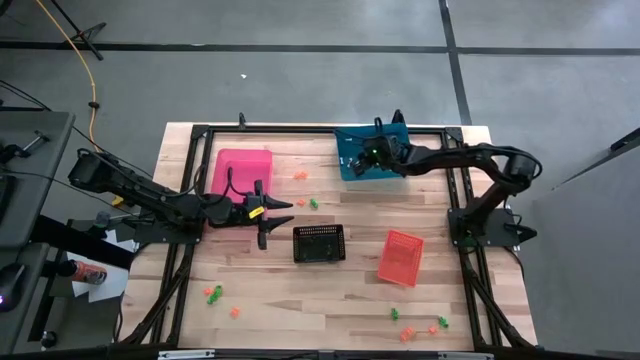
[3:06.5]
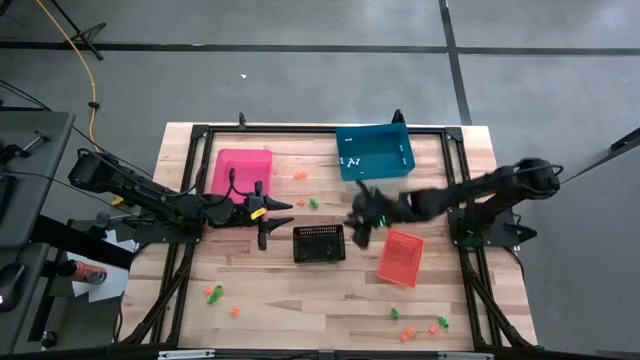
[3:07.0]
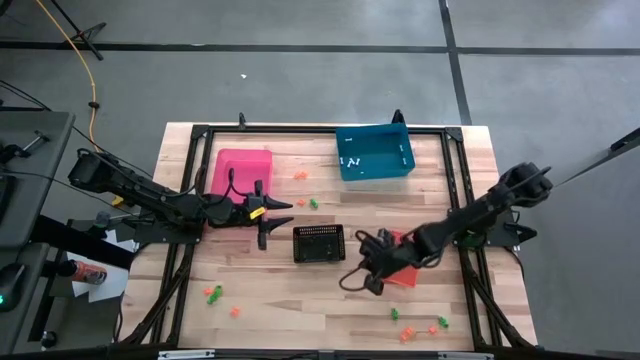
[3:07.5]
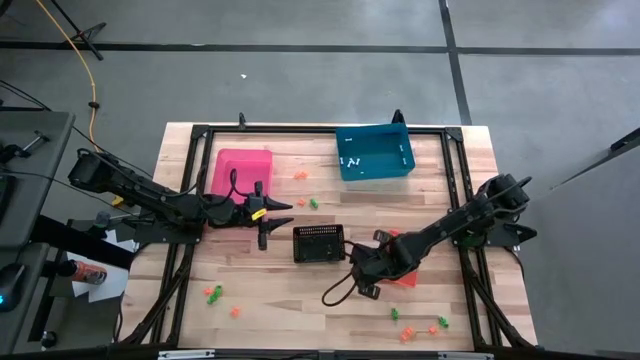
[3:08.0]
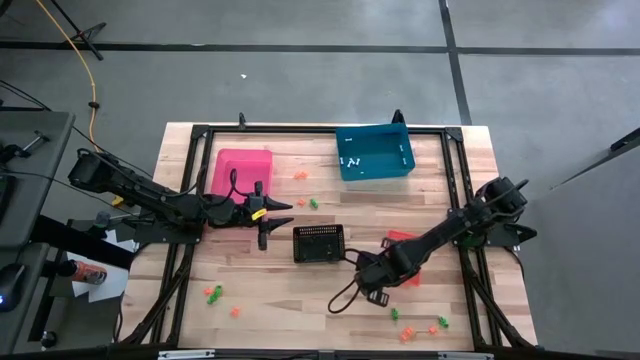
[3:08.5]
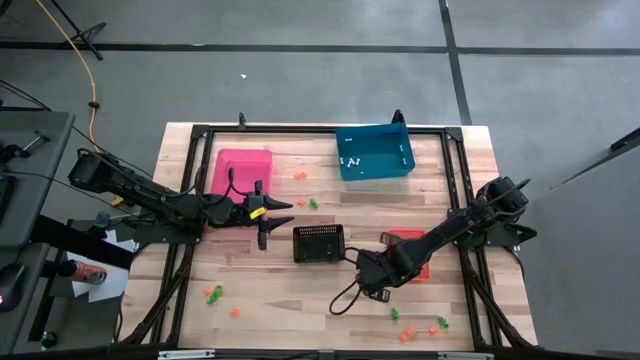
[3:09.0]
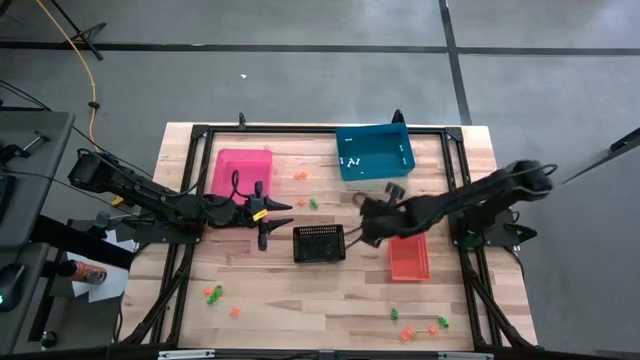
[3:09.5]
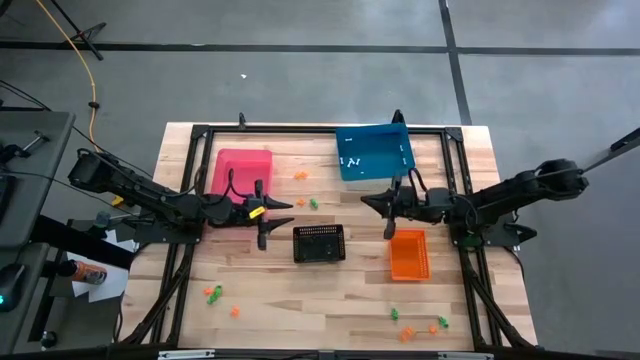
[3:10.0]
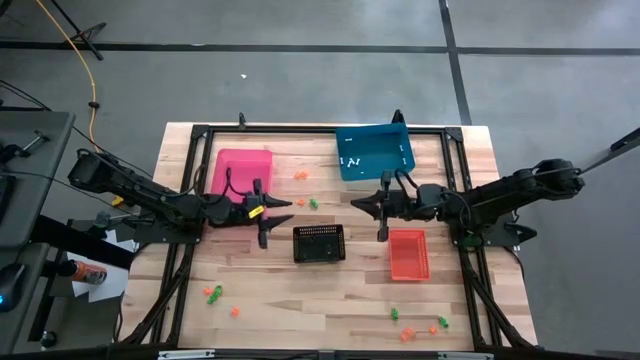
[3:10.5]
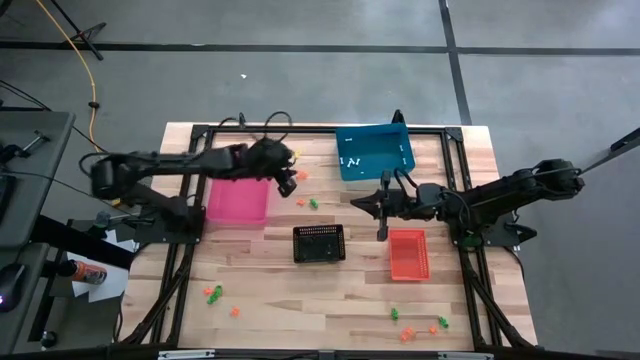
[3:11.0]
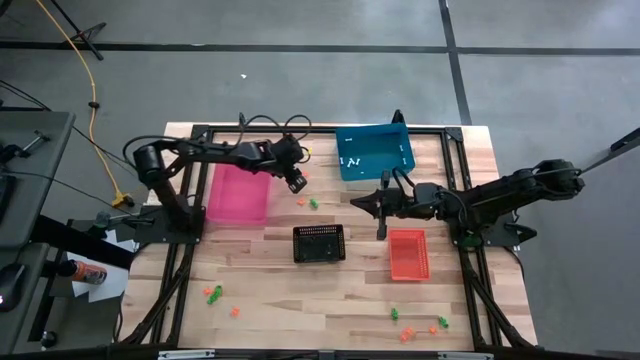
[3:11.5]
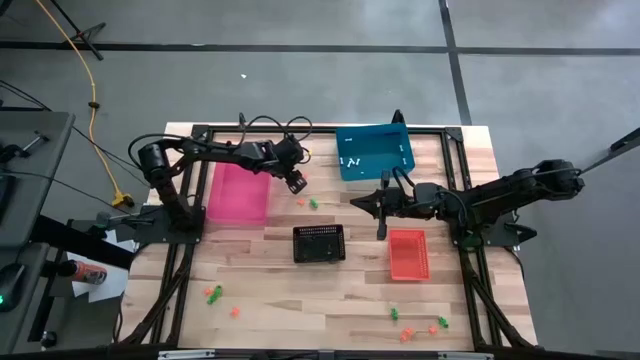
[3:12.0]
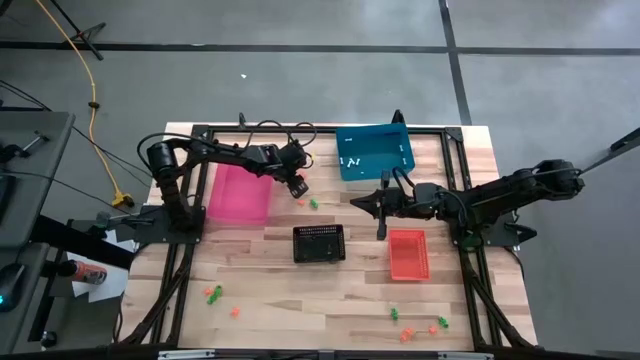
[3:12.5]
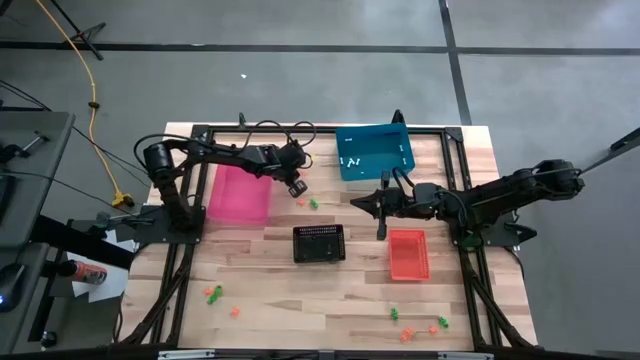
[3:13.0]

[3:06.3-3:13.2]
Task: Sort Halloween decoration
Put the orange spider toy into the pink bin

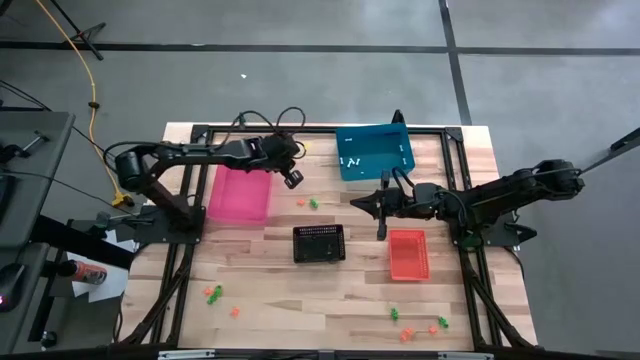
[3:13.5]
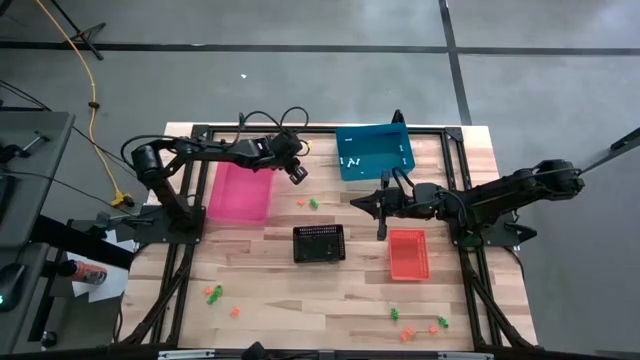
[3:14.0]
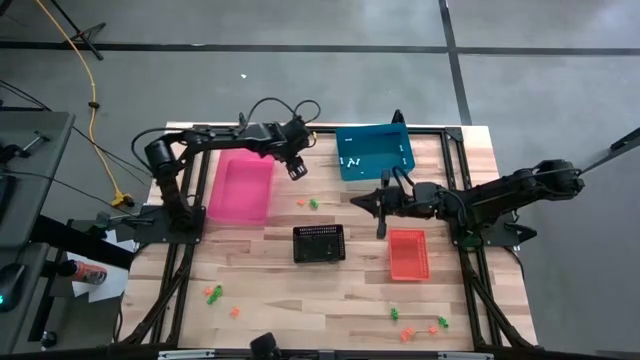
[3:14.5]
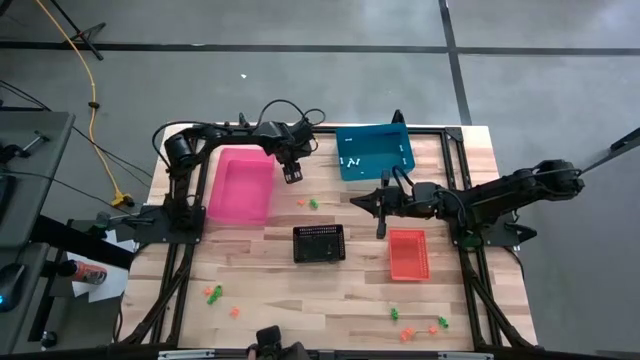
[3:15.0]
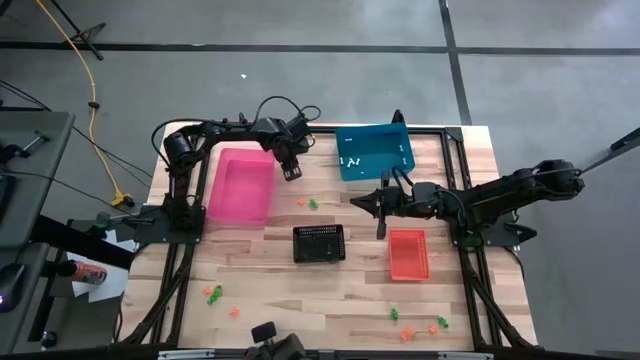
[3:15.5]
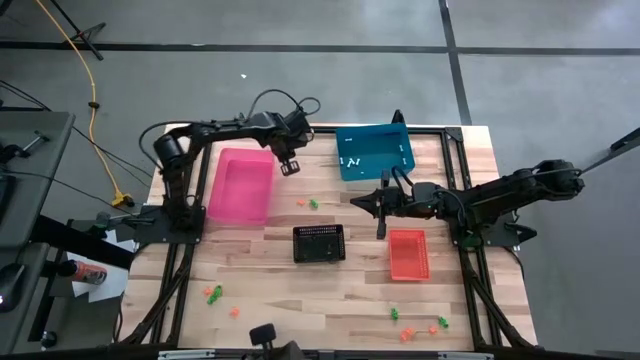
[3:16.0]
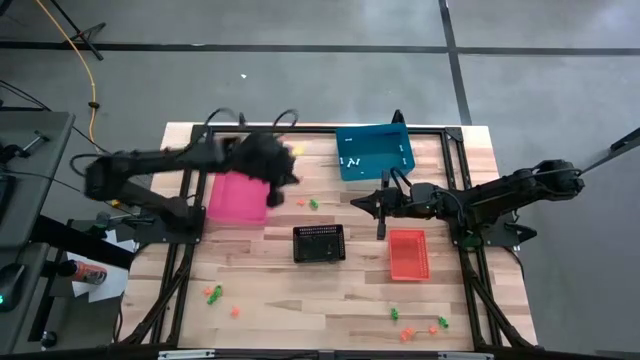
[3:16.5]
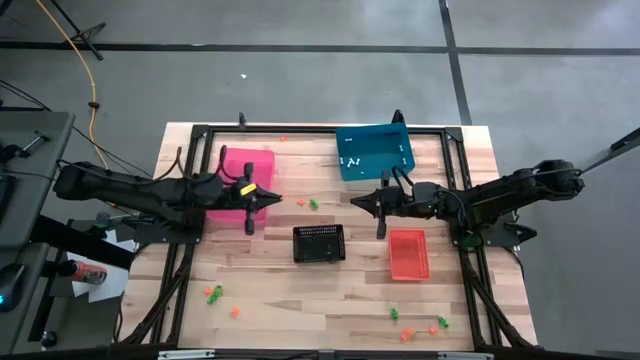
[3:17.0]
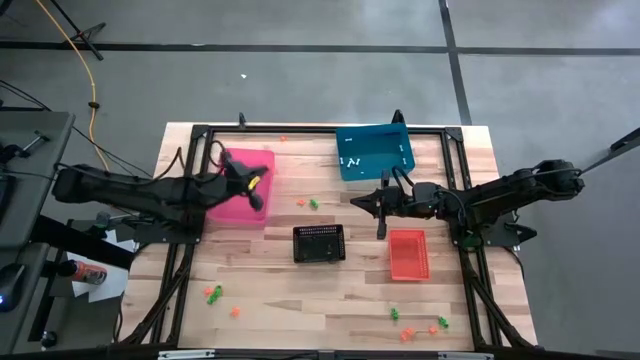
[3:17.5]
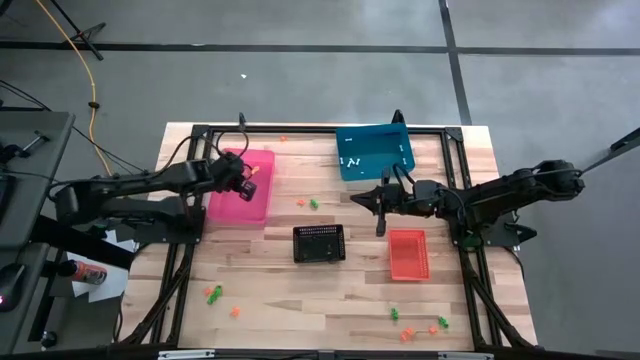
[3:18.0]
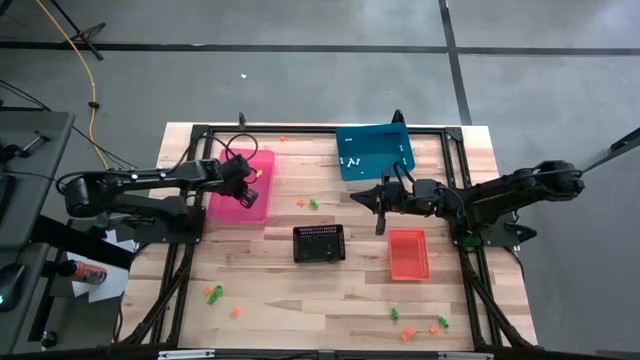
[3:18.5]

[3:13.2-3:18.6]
Put the orange spider toy into the pink bin

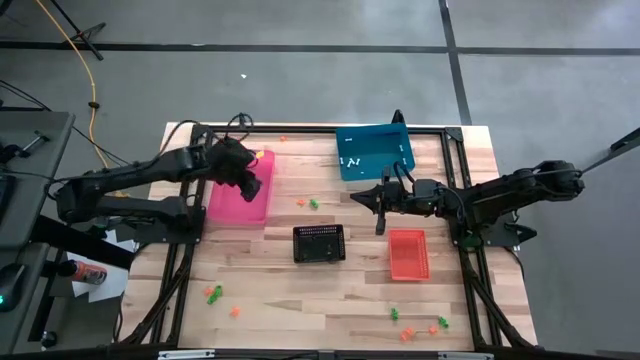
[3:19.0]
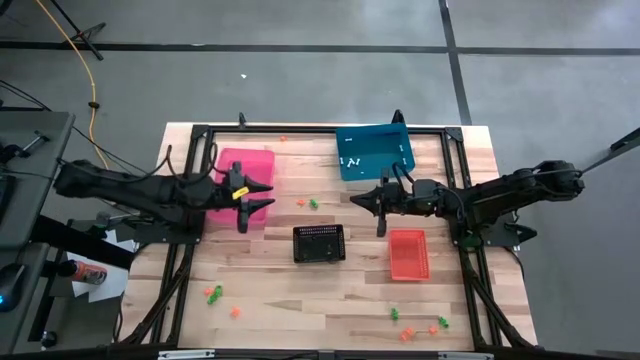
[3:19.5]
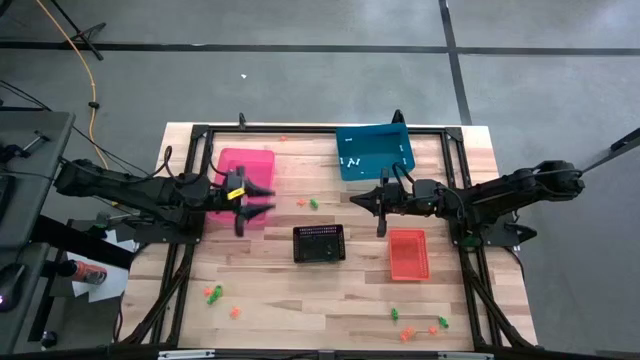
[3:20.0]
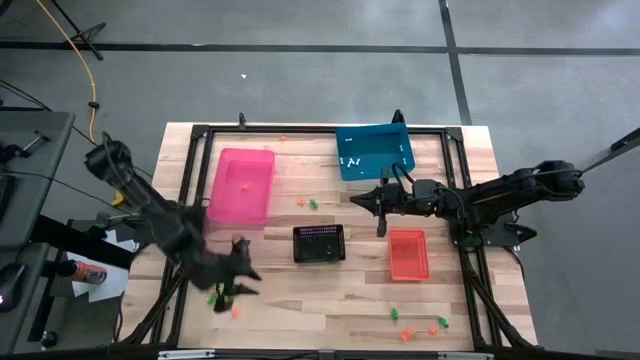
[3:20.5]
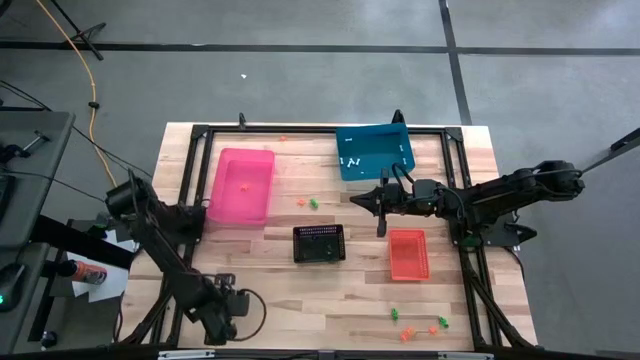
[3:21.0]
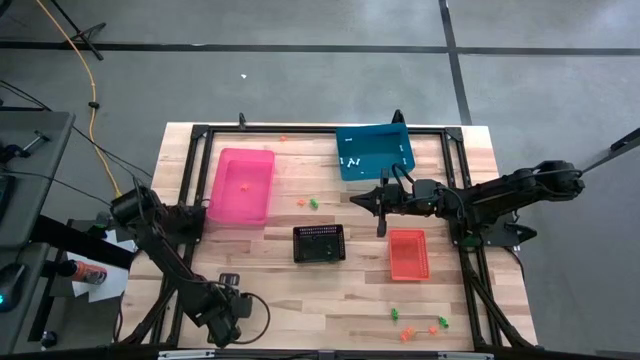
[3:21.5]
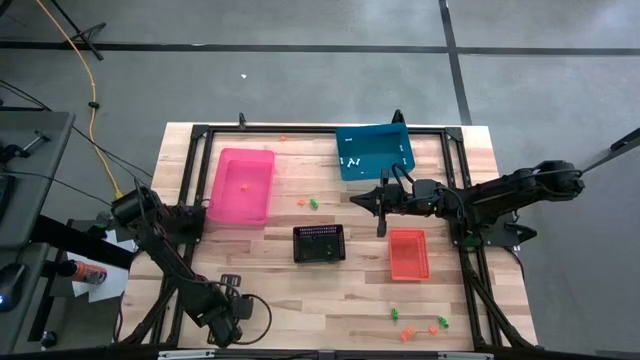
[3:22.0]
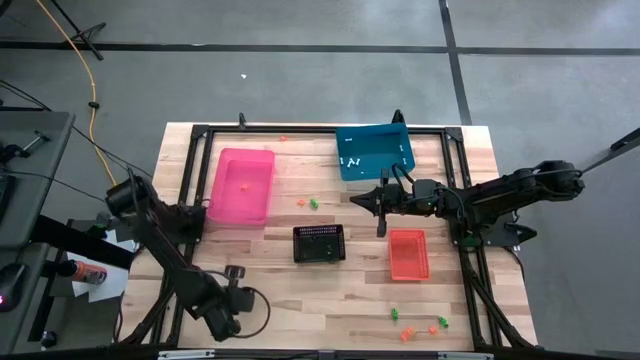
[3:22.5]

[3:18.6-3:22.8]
Put the orange spider toy into the pink bin

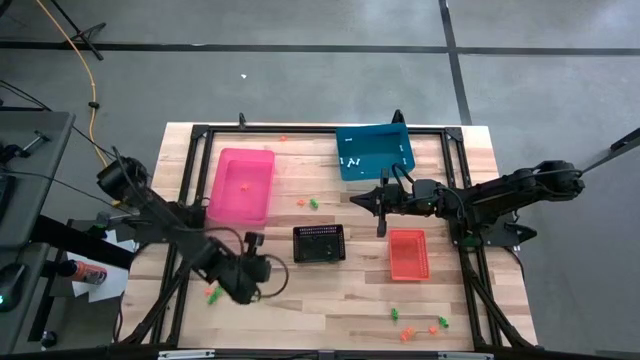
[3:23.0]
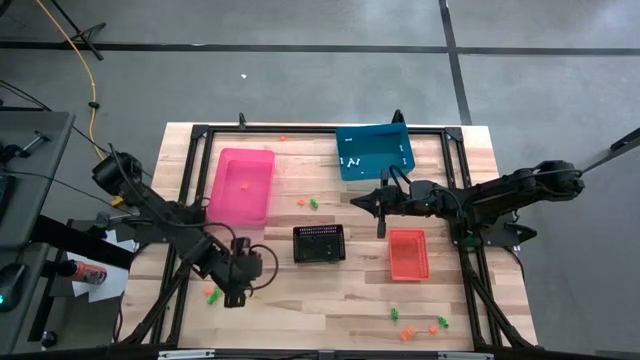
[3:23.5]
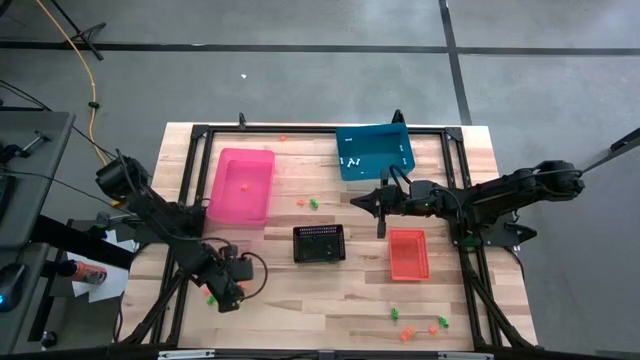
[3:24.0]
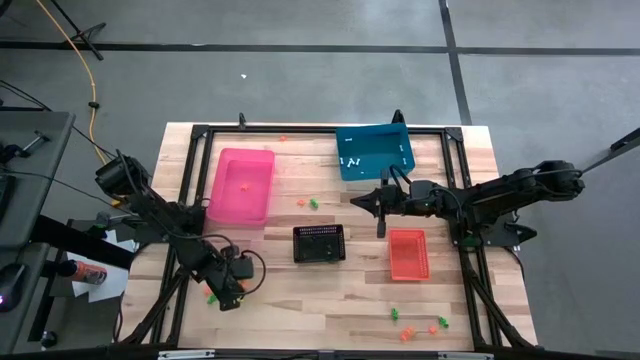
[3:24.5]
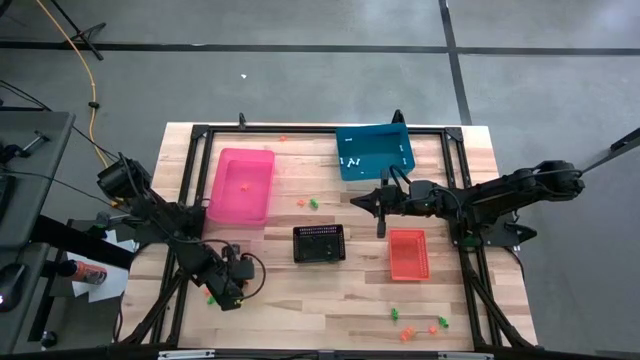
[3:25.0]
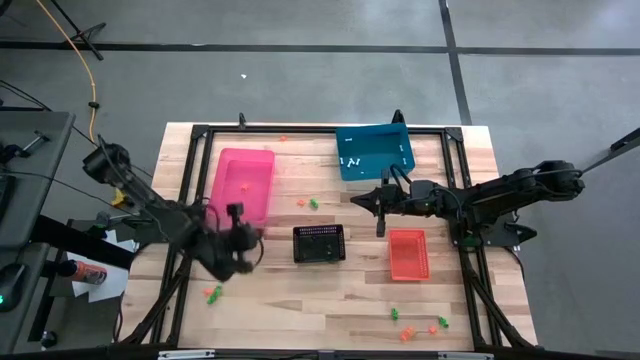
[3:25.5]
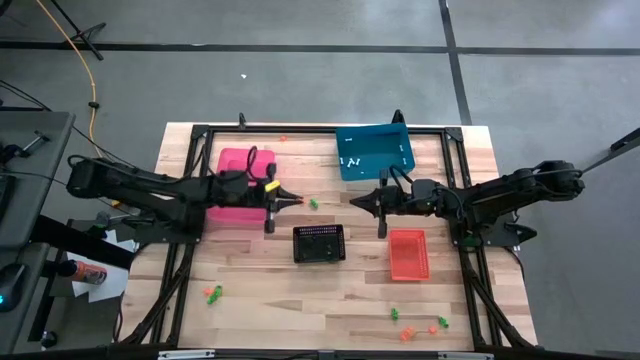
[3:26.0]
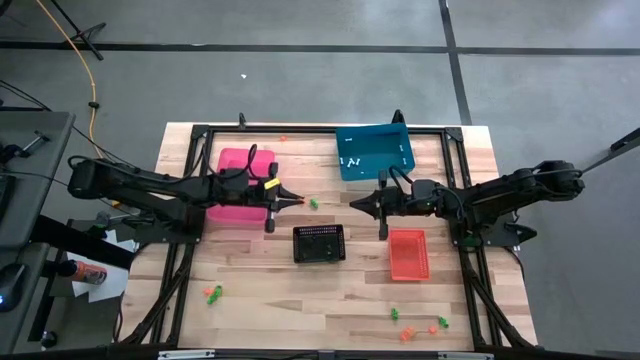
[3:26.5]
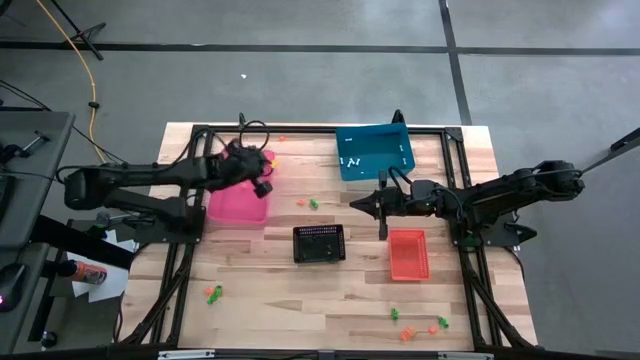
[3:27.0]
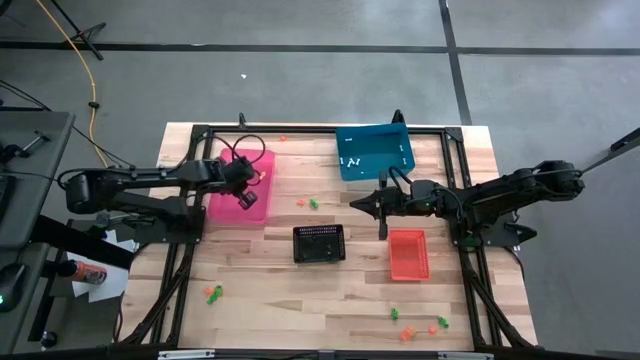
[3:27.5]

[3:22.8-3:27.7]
Put the orange spider toy into the pink bin

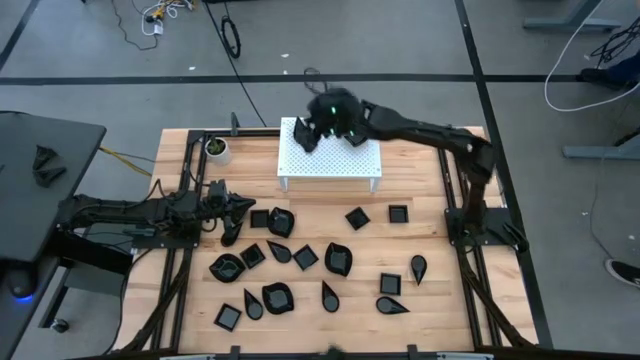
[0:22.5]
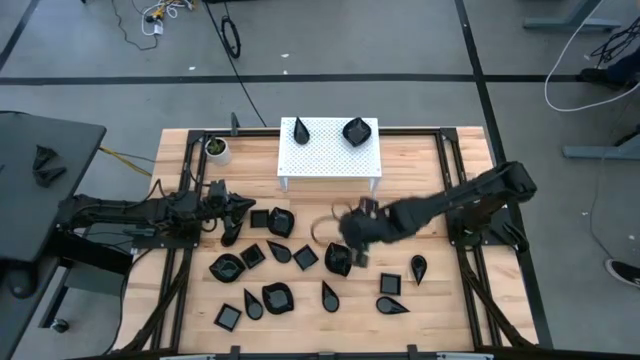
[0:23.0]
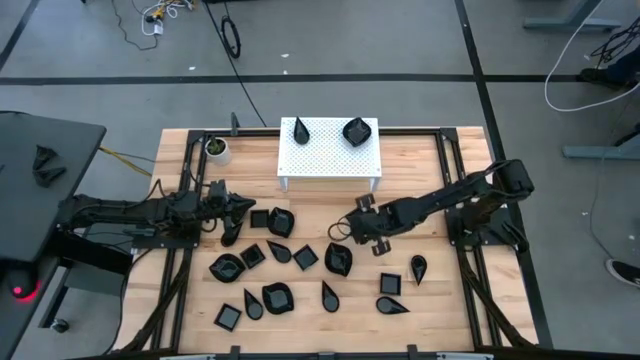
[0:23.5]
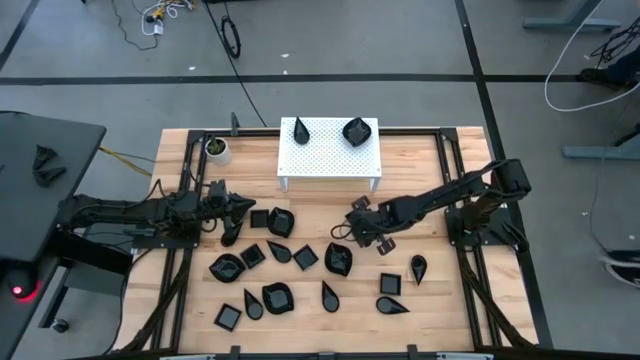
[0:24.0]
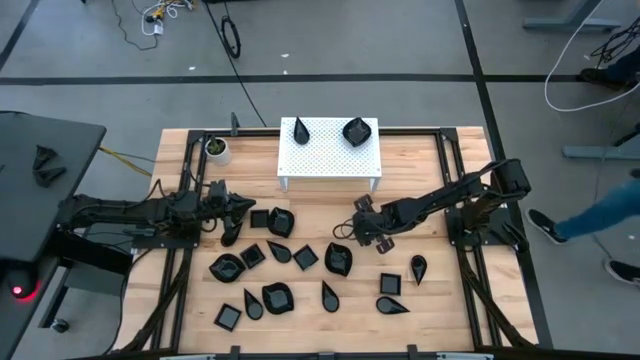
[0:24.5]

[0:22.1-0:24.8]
Task: Pick & Place Mini shaped plates
Put the black square plate on the shelf
